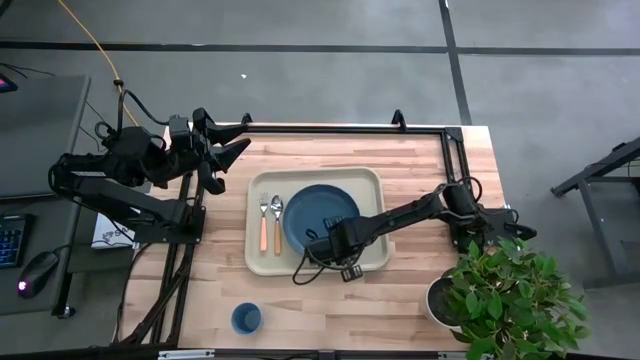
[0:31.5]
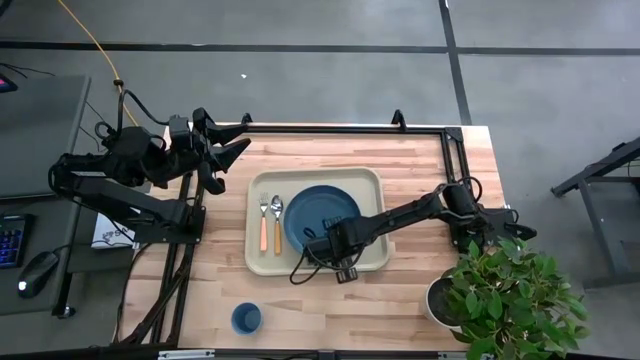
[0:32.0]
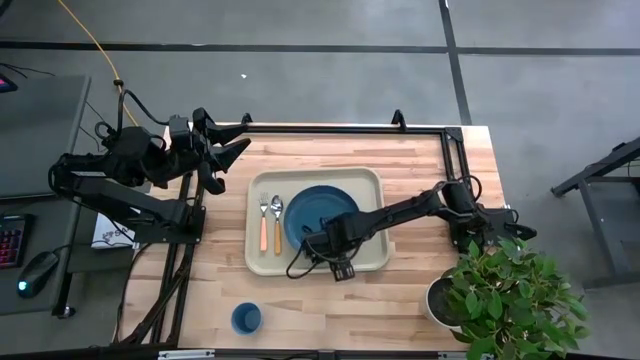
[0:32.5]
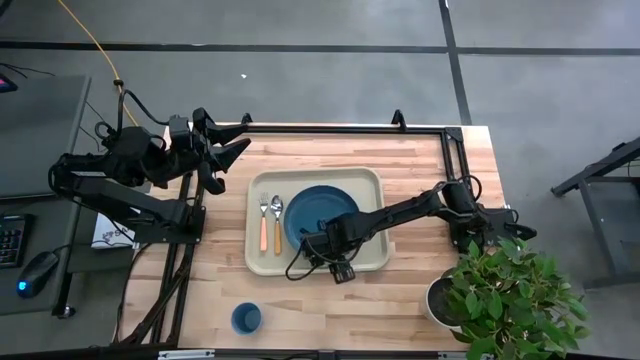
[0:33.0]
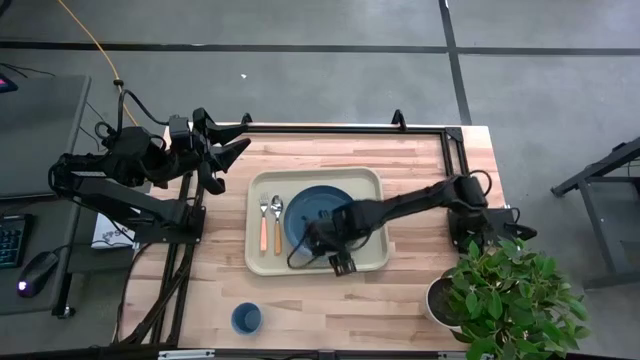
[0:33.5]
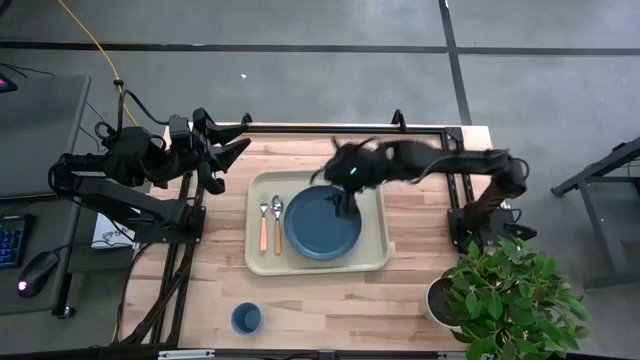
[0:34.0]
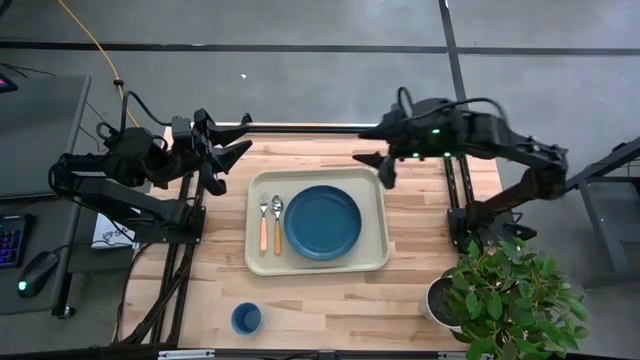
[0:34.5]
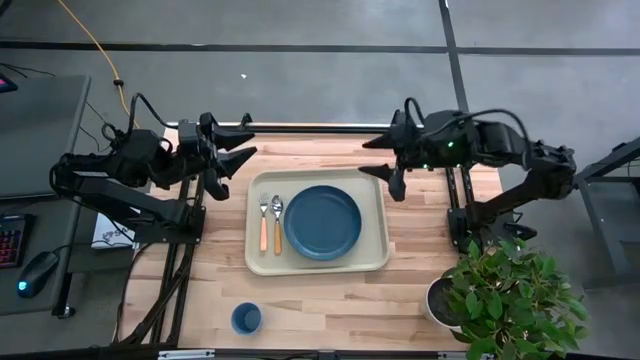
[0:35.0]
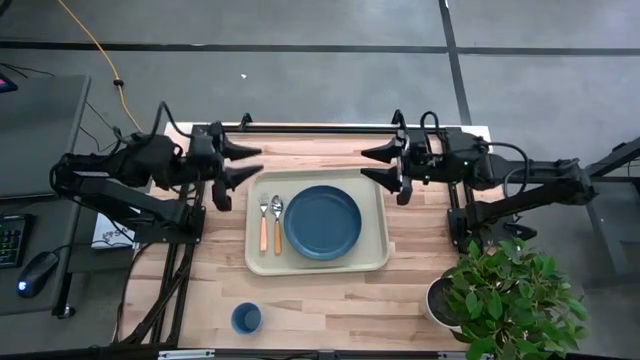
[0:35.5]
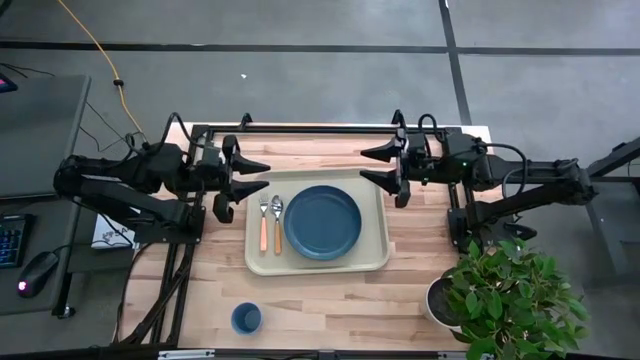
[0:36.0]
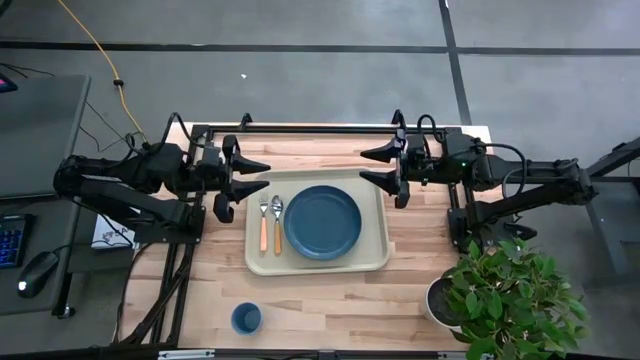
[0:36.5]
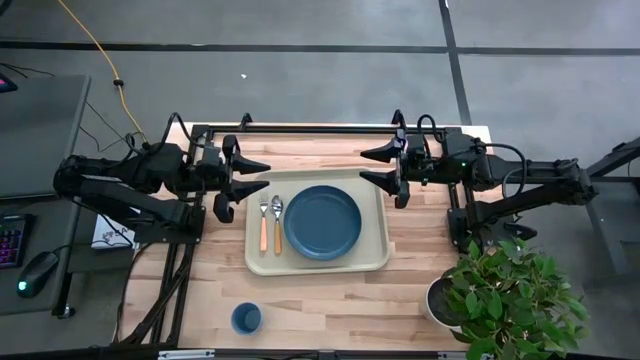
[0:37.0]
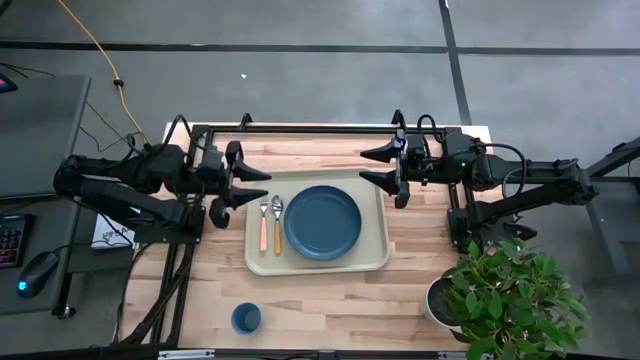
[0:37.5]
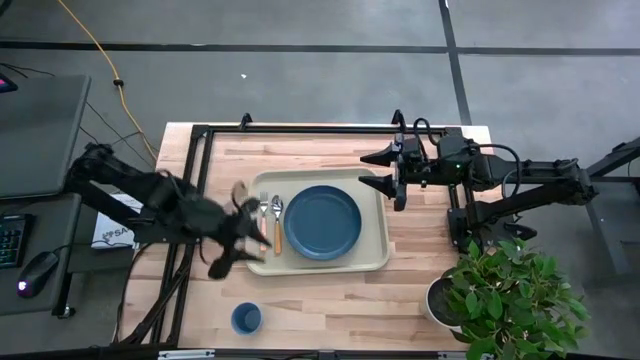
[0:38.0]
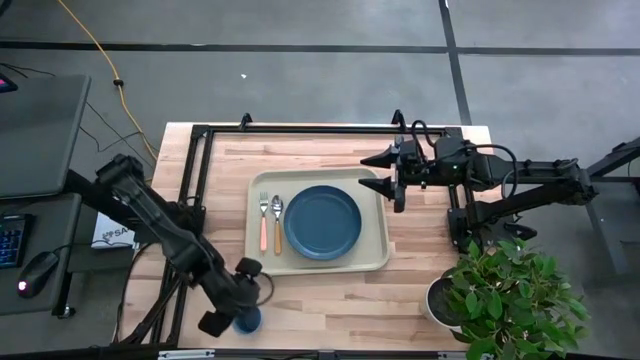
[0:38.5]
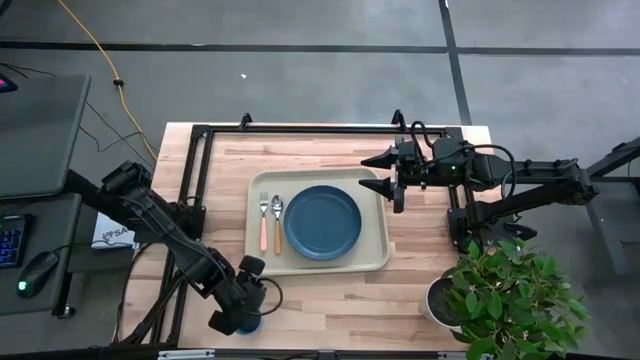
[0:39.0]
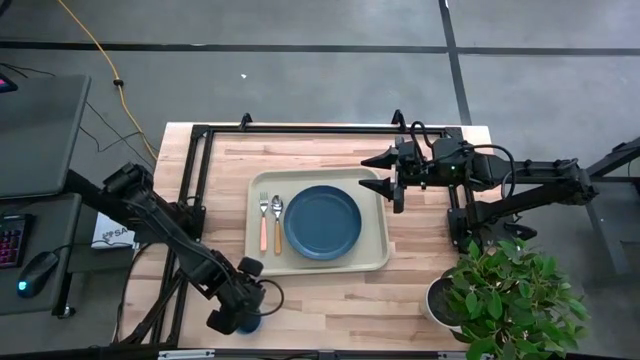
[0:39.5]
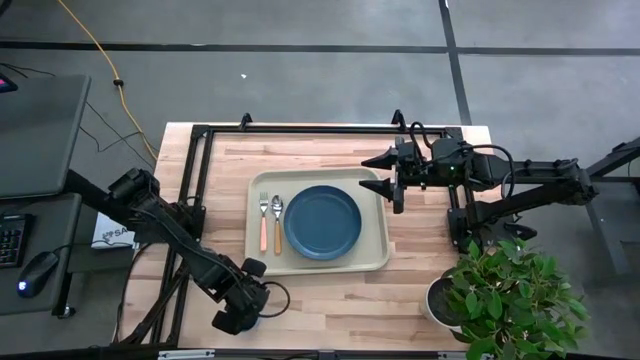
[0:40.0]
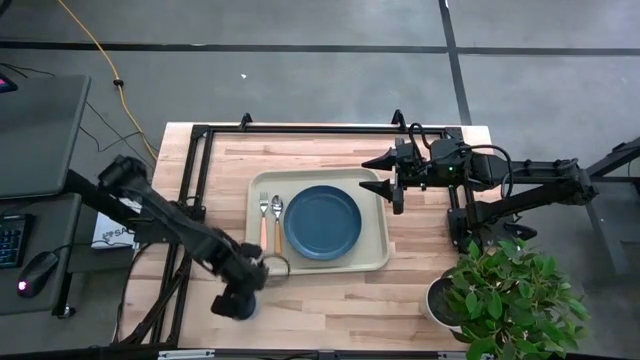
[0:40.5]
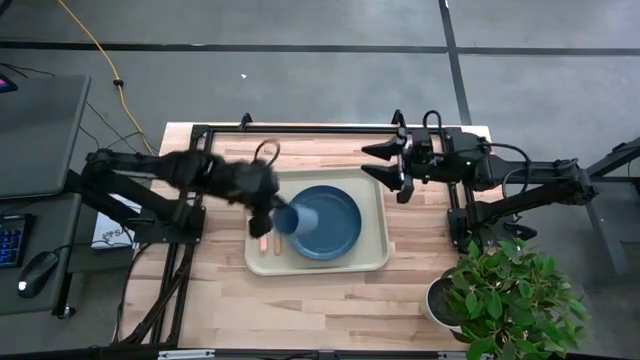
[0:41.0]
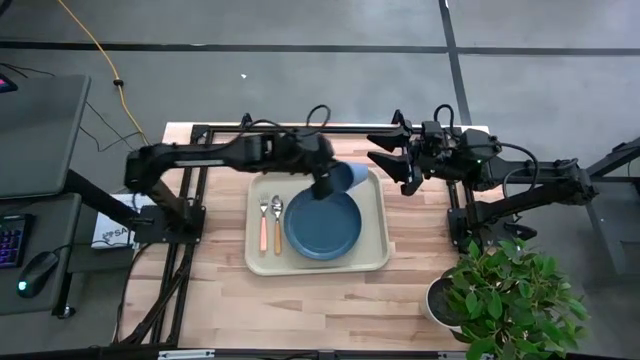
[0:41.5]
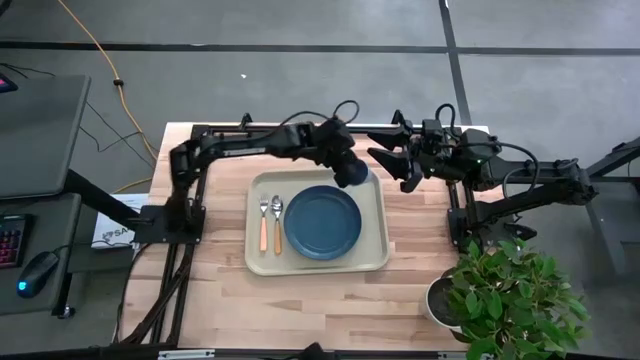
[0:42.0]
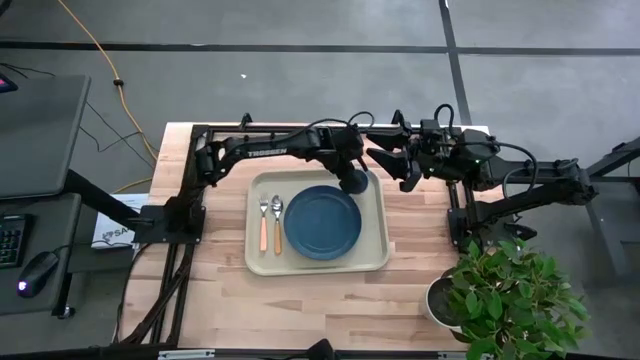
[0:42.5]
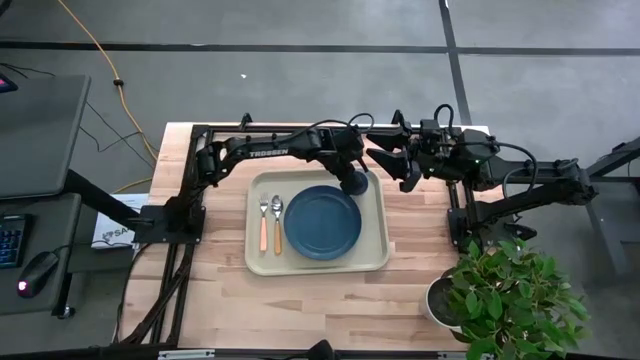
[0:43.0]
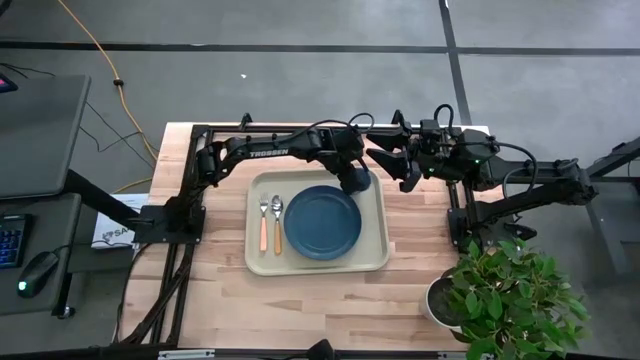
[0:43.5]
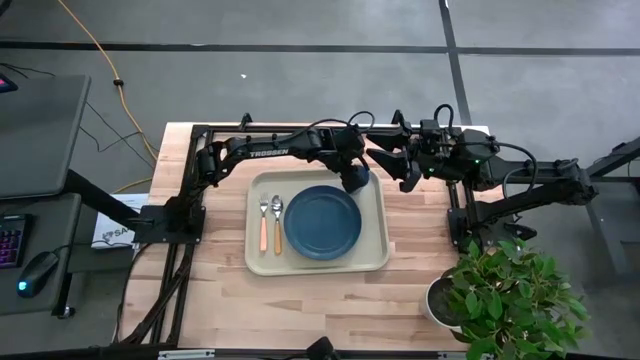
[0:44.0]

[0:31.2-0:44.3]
Task: Pick and place plate/cup/fork/spoon on tray
Put the blue cup to the top right of the blue plate on the gray serving tray

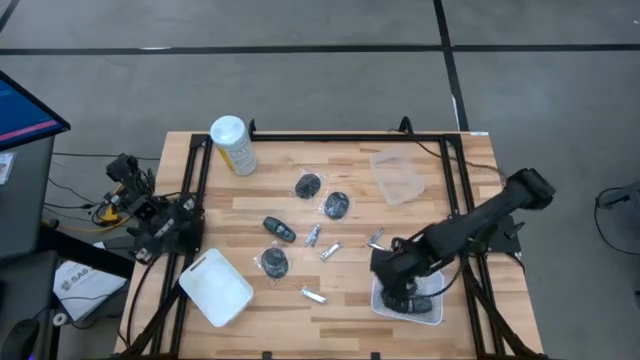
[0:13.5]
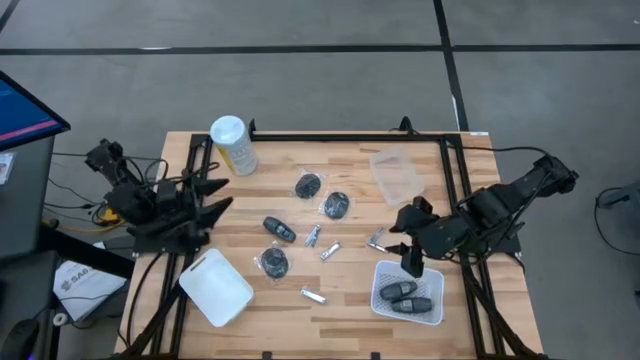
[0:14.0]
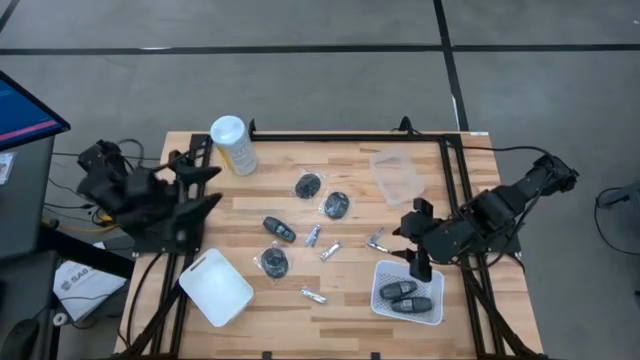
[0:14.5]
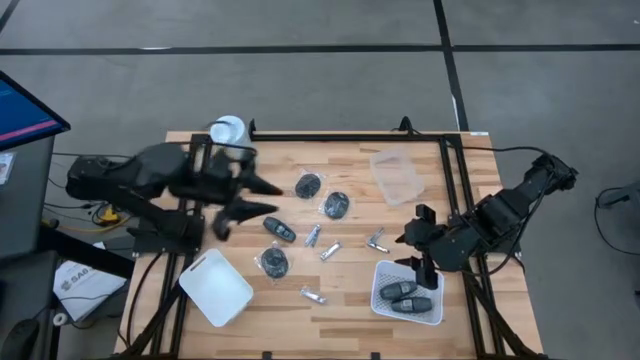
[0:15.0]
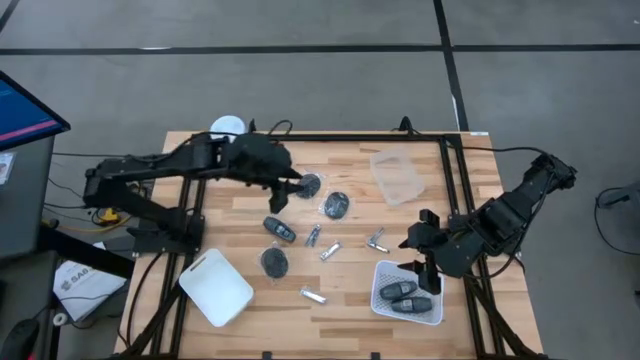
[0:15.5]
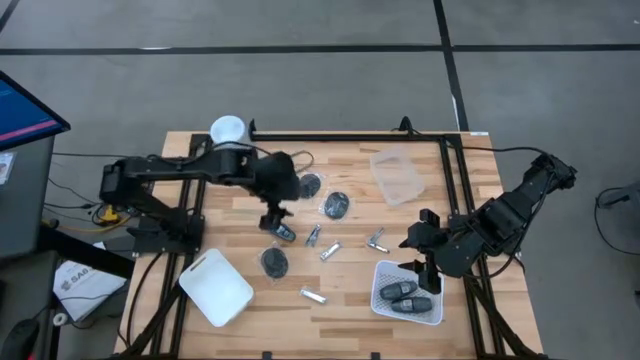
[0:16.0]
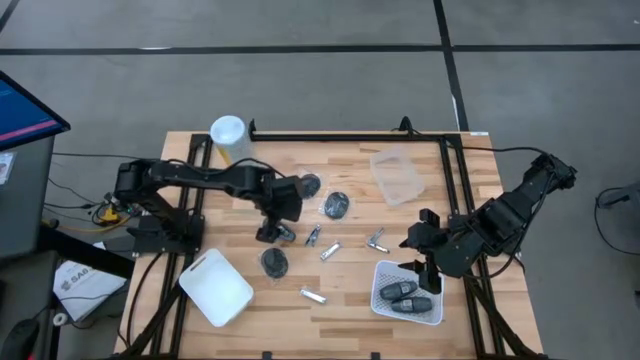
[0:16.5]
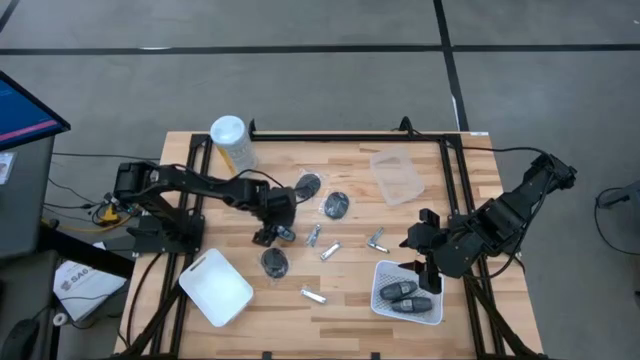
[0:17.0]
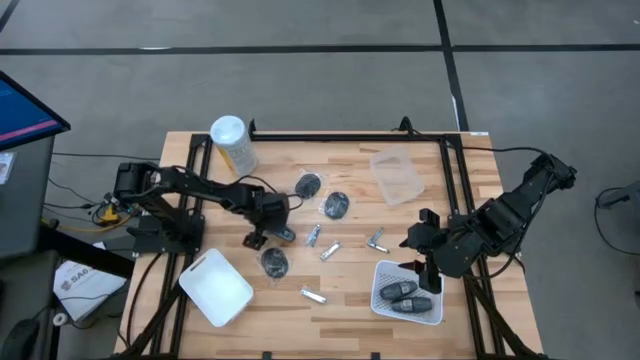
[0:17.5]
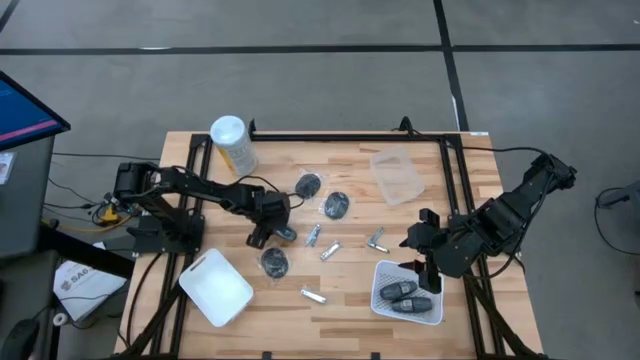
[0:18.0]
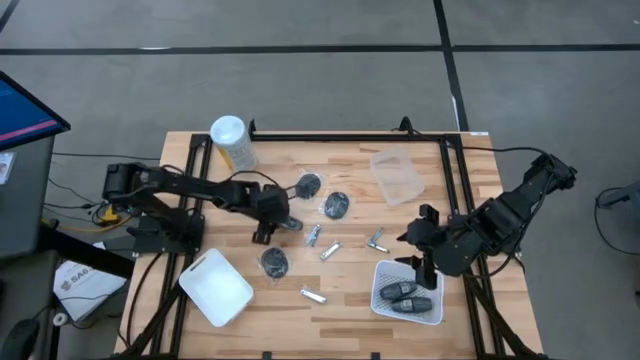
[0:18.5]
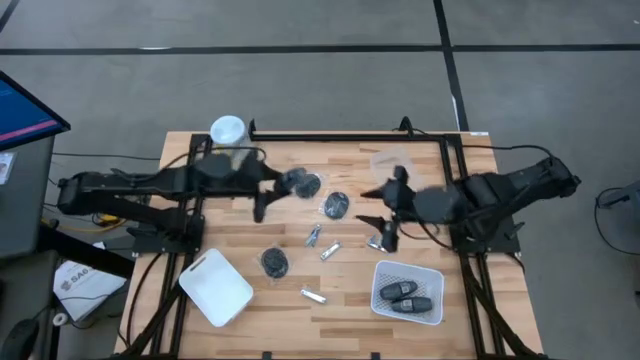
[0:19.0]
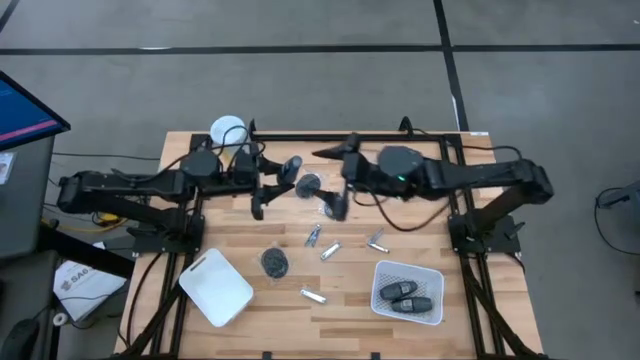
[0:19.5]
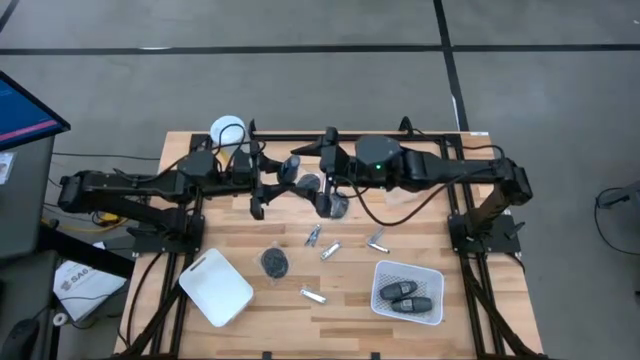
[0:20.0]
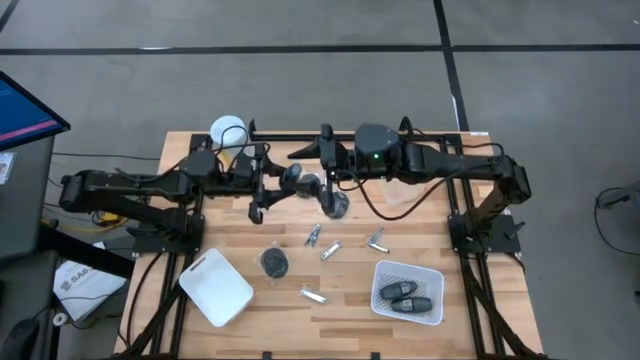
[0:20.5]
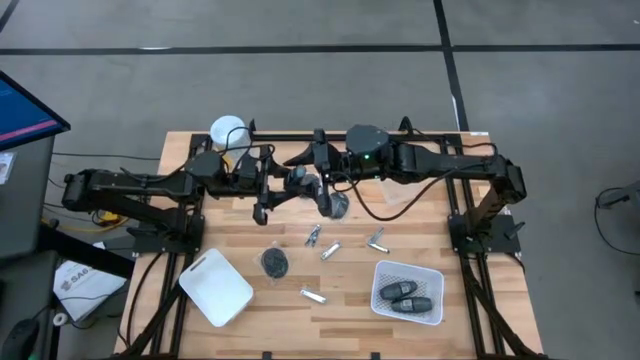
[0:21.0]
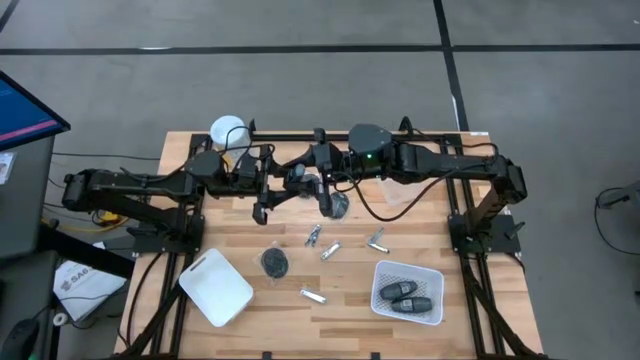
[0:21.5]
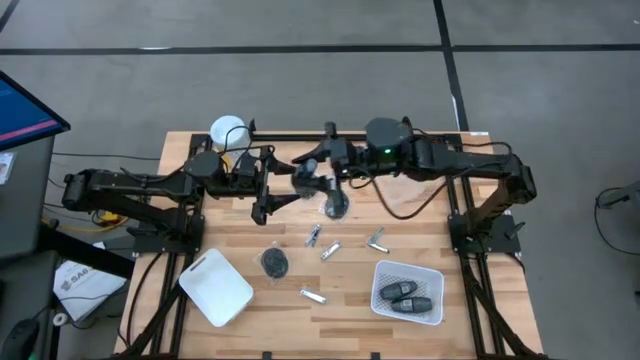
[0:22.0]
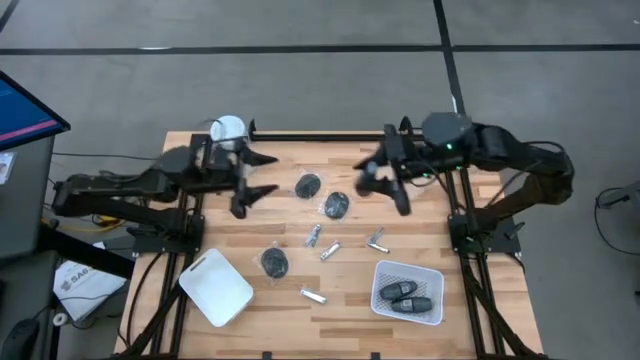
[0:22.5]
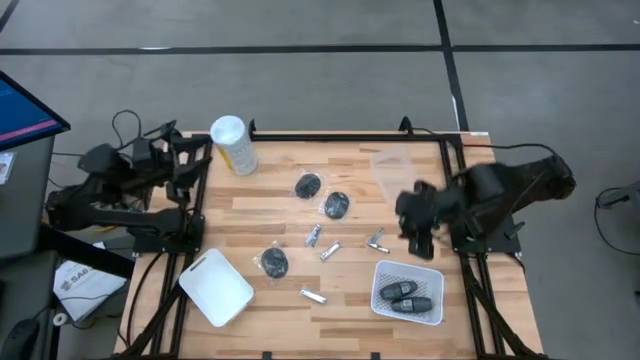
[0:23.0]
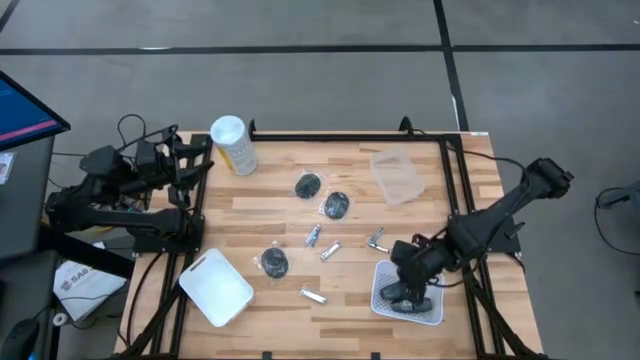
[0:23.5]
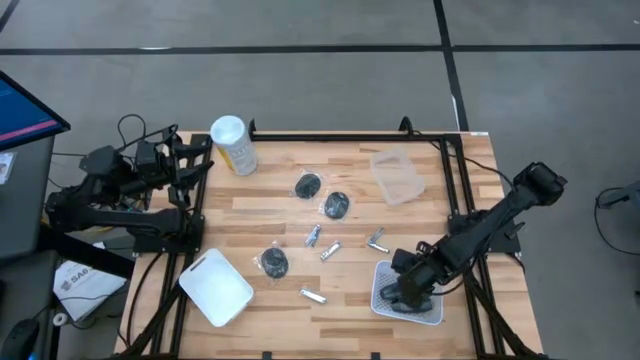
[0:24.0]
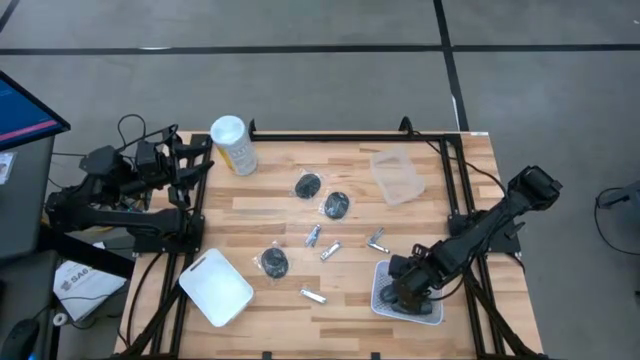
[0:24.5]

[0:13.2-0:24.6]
Task: Pick & Place Travel size toiletries
Put the black deodorant into the bottom right white bin
